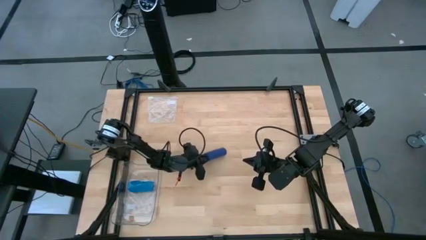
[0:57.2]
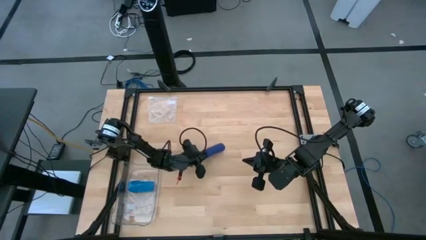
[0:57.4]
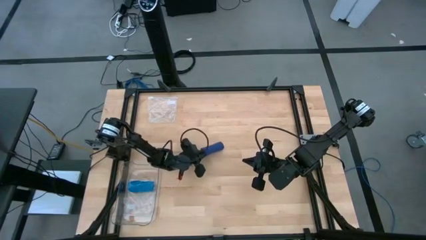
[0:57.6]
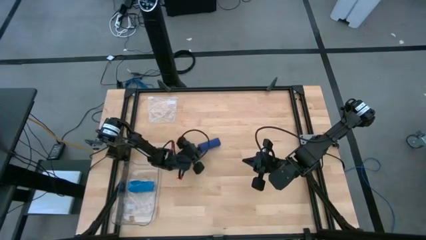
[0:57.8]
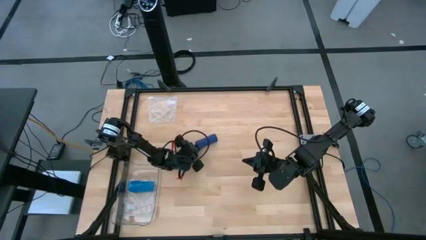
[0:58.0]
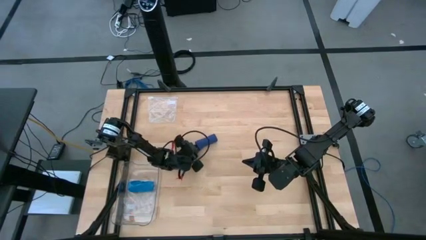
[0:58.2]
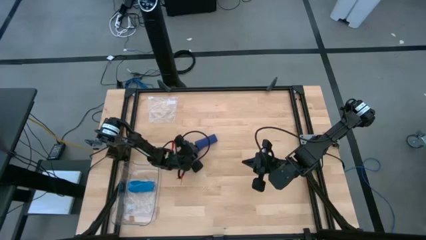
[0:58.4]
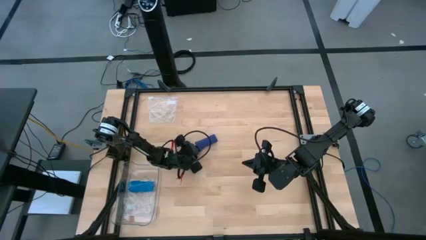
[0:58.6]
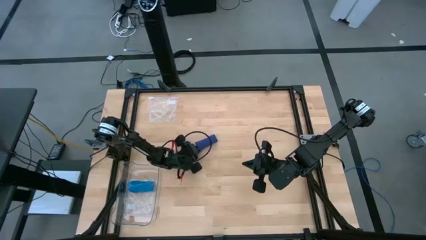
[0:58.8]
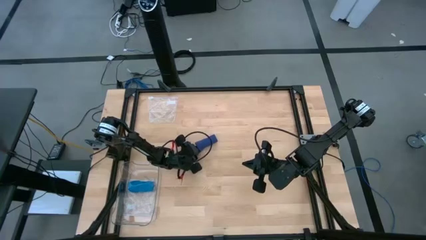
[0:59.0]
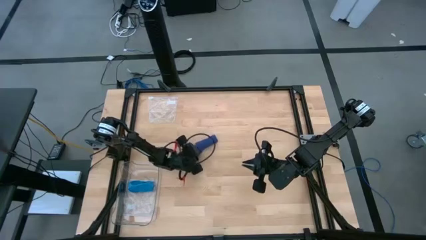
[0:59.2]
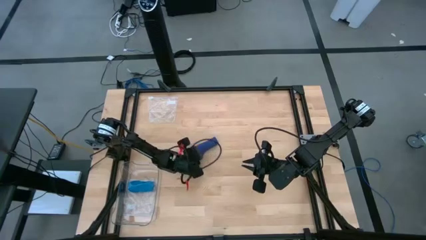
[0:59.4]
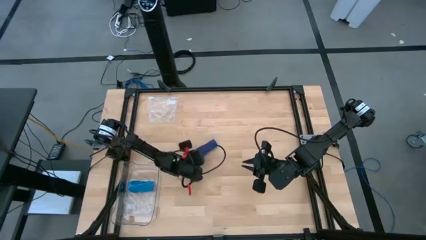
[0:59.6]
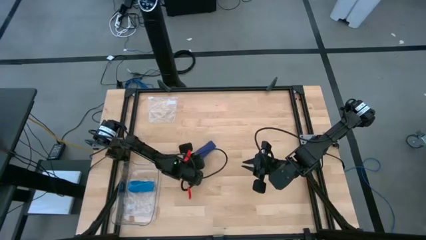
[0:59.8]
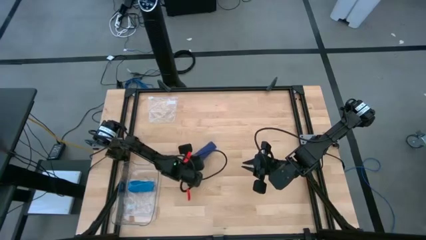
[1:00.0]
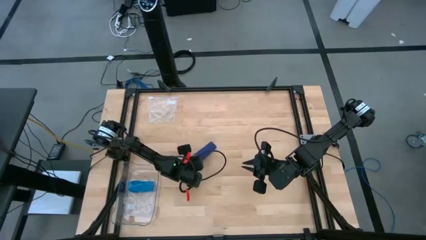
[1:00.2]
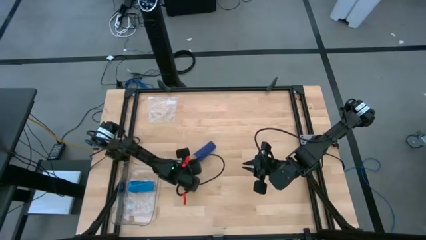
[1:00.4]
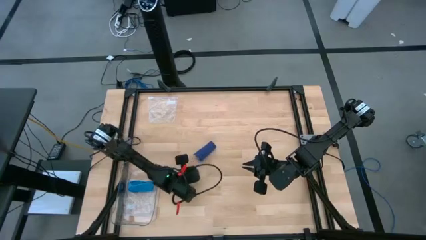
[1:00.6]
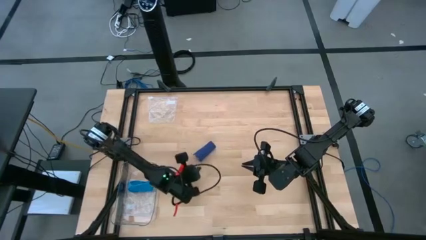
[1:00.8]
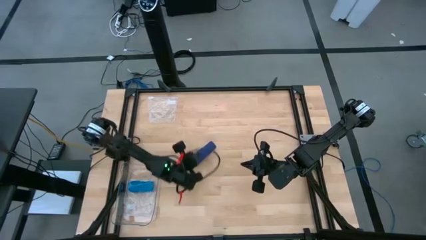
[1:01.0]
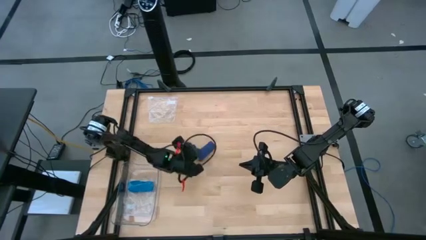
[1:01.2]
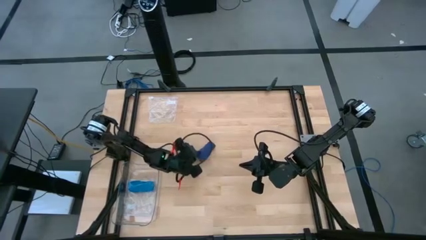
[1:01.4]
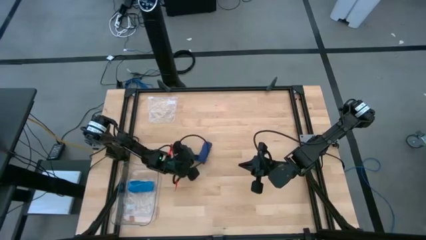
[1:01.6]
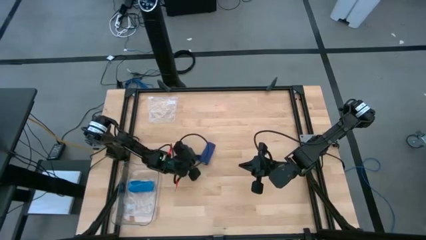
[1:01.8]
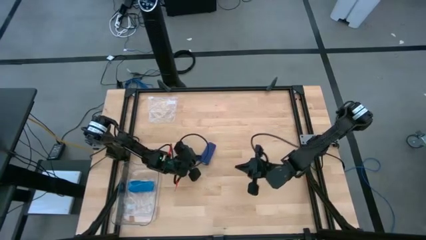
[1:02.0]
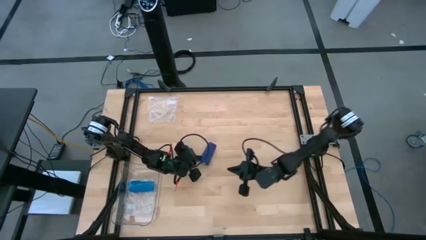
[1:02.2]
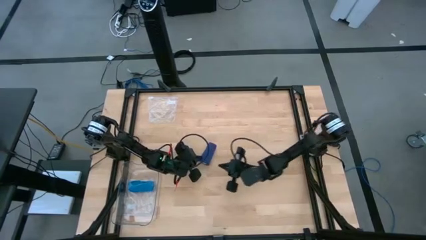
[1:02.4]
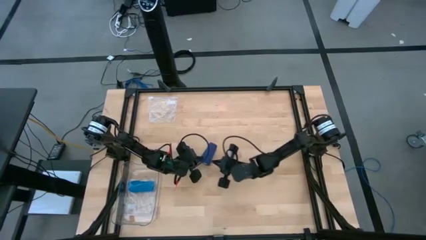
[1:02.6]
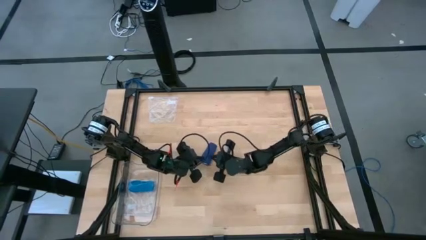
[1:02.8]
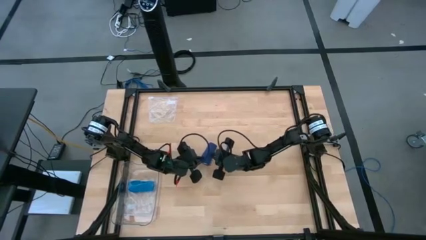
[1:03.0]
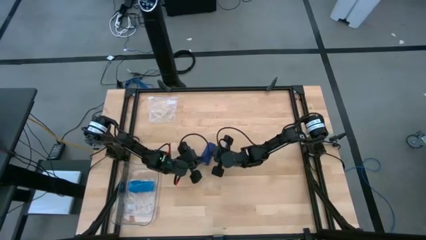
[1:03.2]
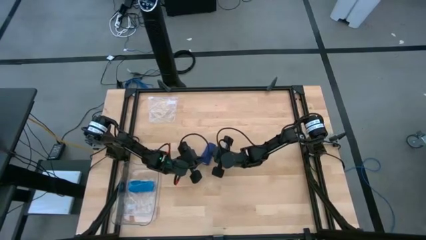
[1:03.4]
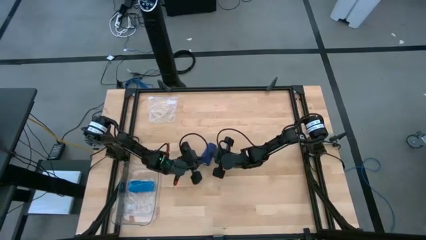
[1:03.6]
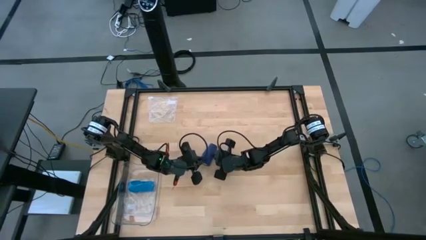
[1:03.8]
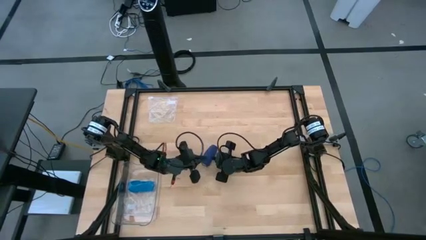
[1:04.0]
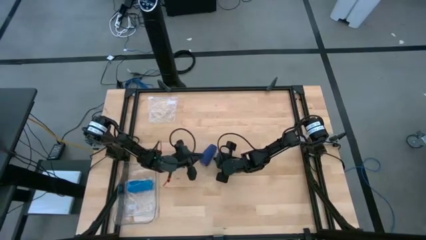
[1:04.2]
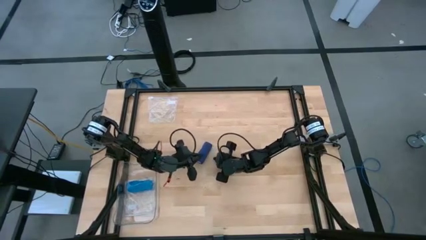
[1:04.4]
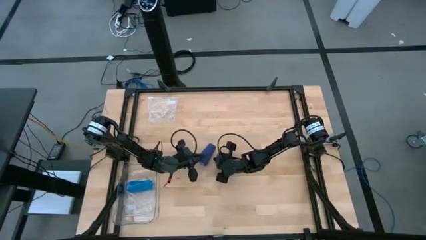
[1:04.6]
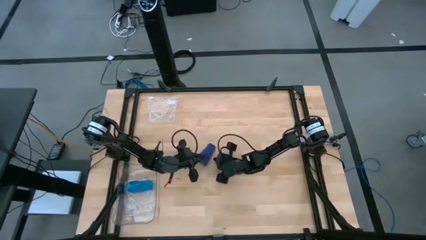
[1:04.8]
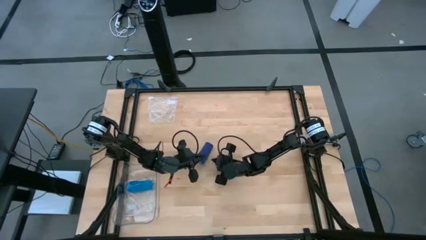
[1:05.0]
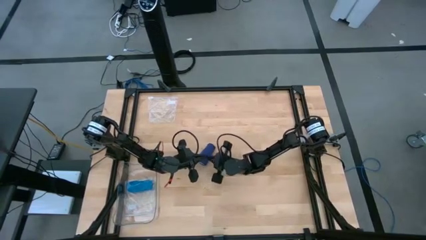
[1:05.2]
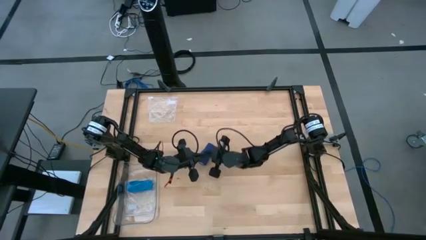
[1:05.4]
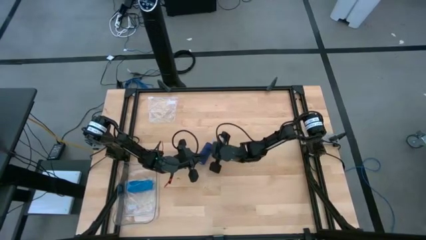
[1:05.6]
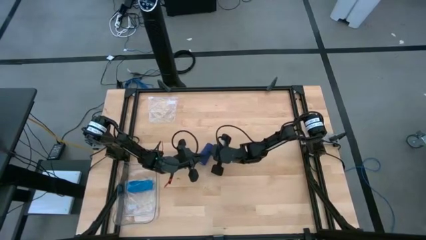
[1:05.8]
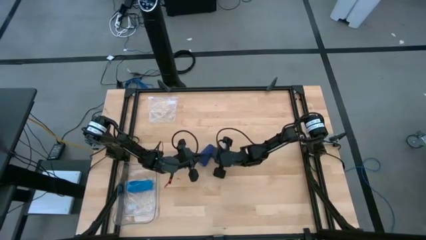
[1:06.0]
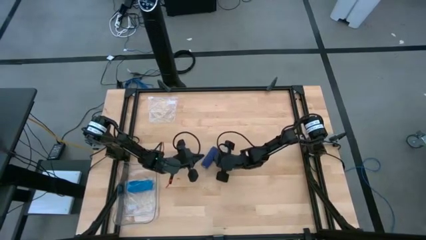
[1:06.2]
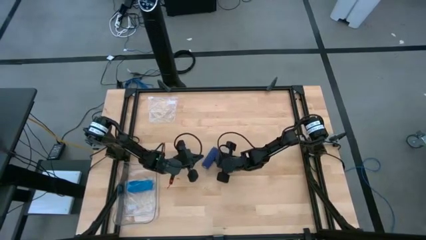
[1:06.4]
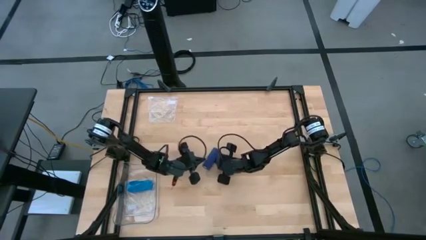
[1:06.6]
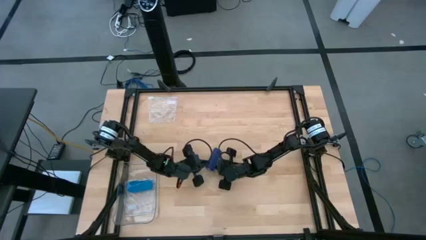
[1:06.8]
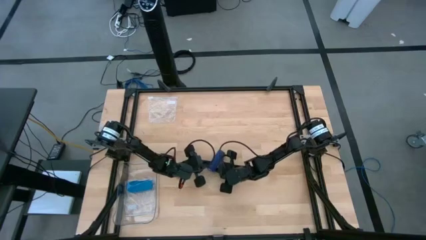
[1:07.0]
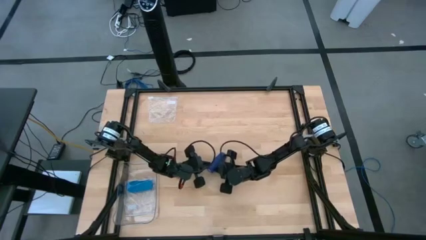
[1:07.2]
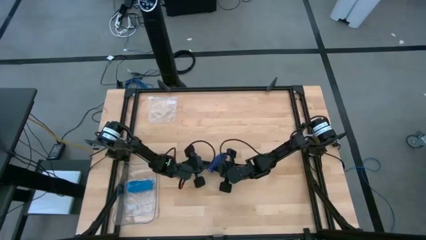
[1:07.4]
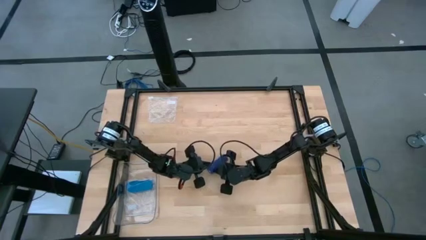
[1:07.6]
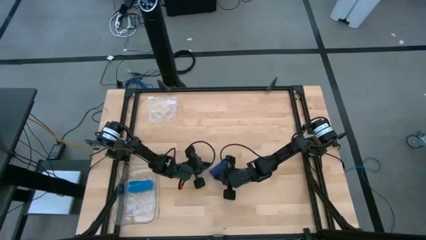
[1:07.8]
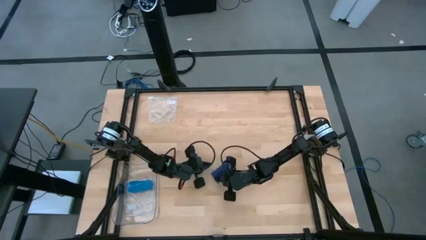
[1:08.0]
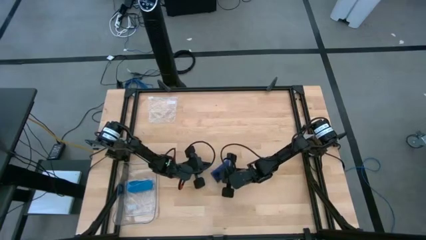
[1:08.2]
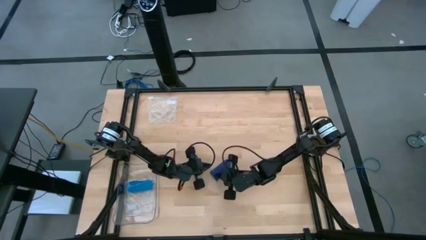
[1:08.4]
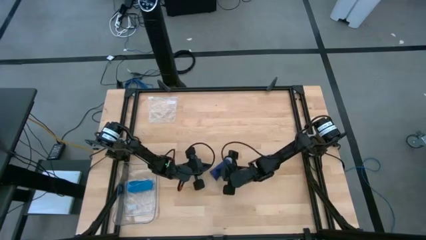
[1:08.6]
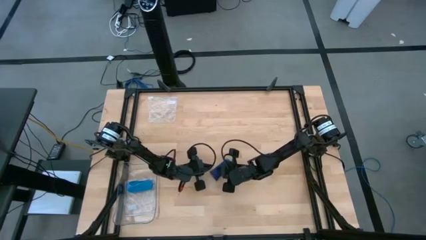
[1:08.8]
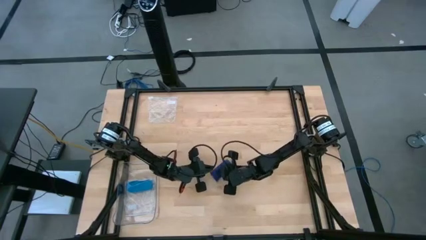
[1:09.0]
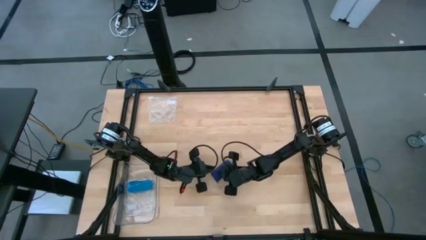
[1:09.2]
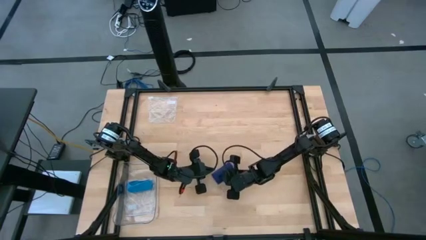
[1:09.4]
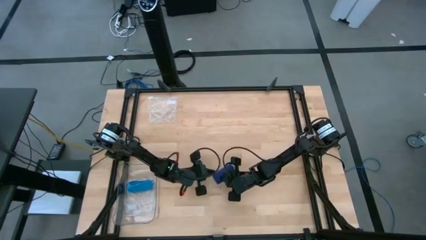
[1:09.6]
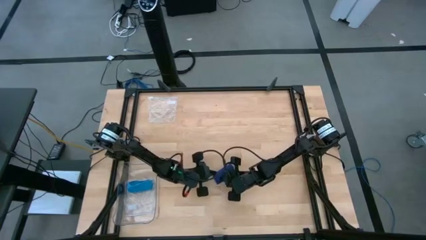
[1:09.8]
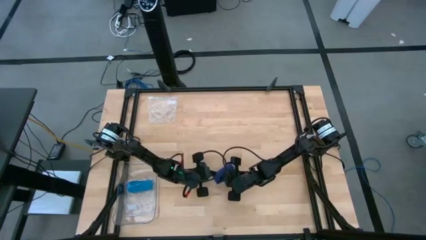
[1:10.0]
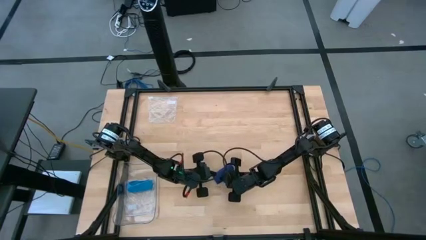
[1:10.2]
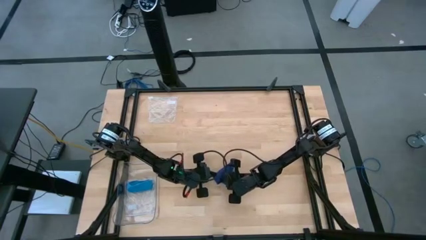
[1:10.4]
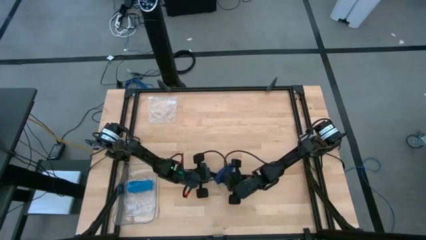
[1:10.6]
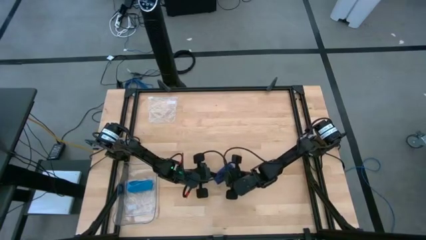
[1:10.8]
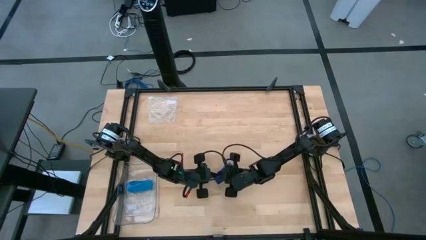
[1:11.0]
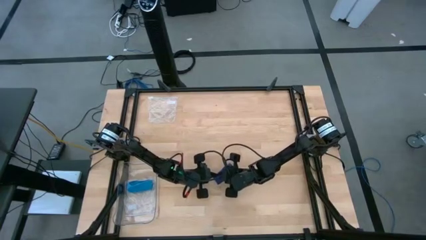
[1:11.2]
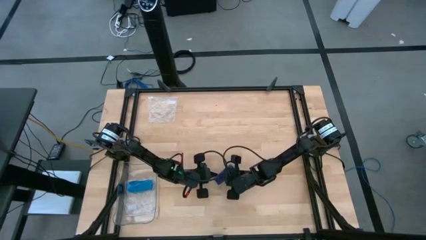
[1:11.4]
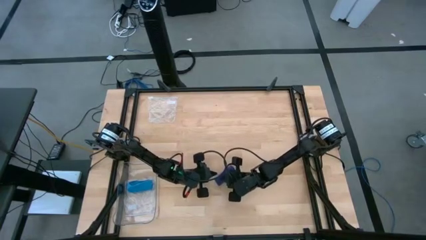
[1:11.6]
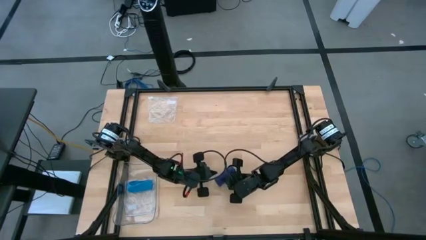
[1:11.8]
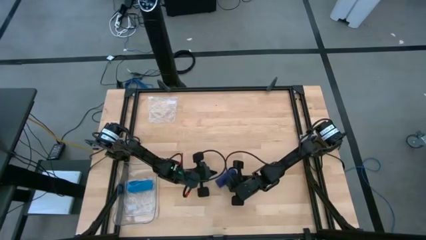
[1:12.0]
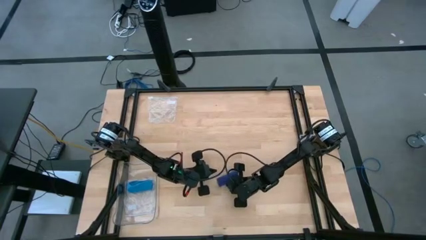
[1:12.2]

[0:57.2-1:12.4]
Task: Roll bandage
Roll the blue bandage
